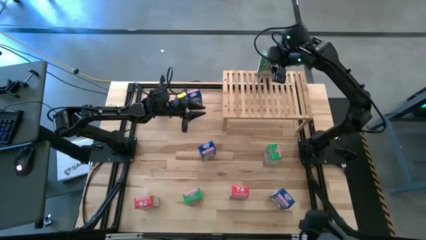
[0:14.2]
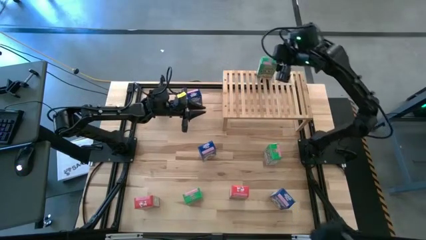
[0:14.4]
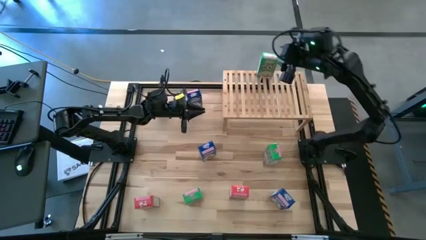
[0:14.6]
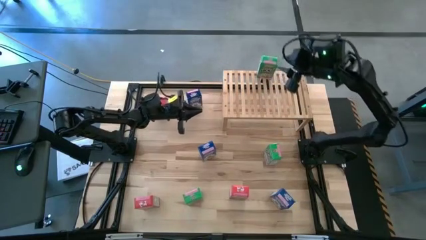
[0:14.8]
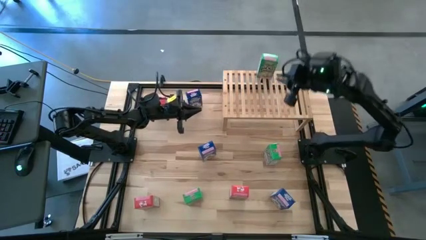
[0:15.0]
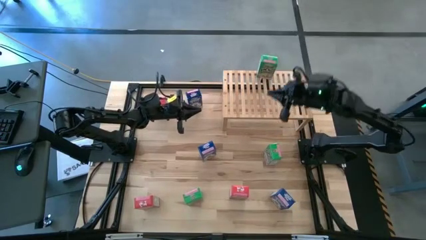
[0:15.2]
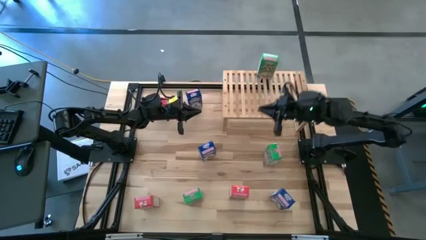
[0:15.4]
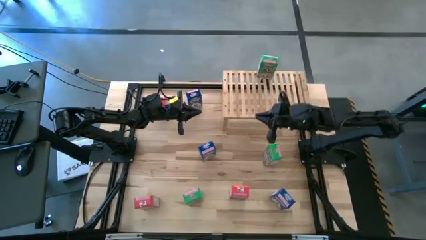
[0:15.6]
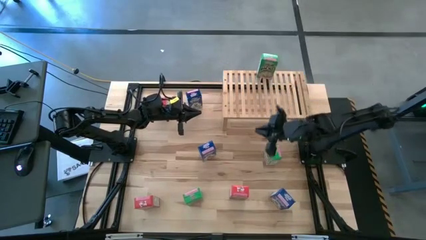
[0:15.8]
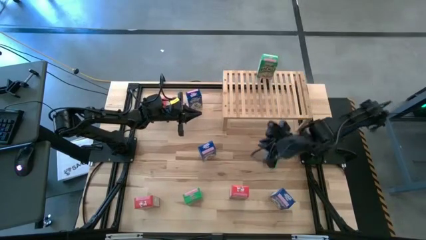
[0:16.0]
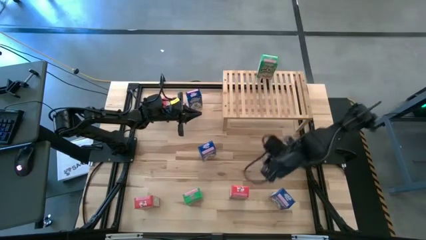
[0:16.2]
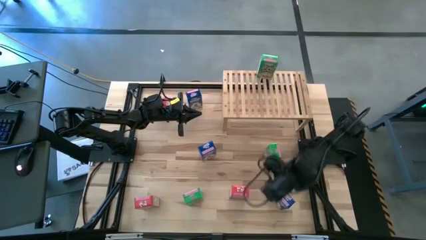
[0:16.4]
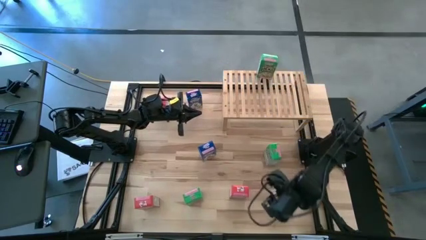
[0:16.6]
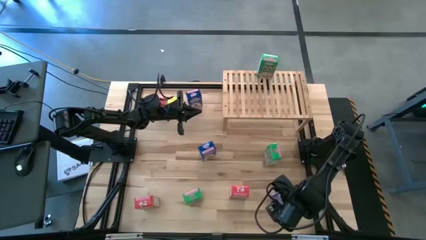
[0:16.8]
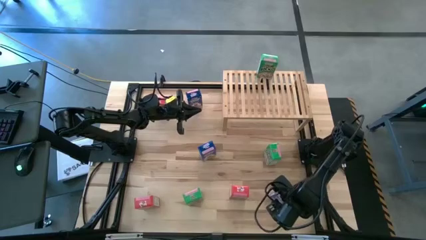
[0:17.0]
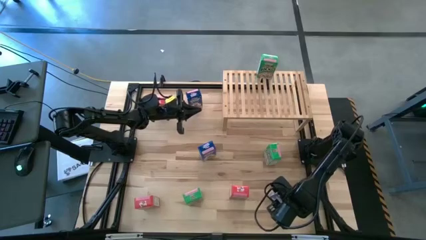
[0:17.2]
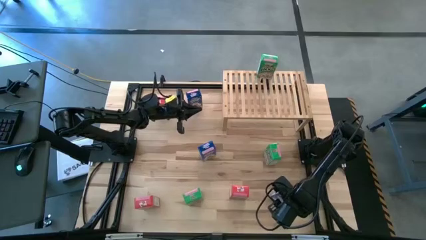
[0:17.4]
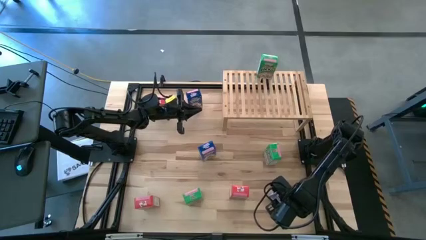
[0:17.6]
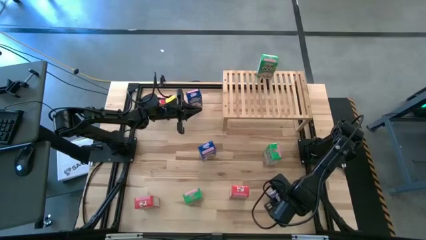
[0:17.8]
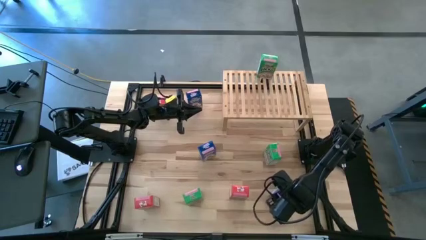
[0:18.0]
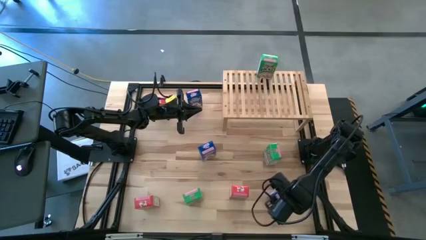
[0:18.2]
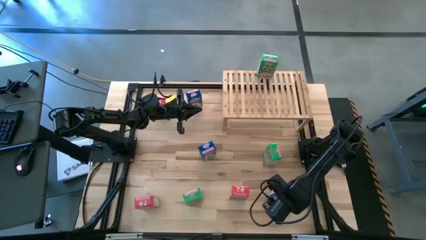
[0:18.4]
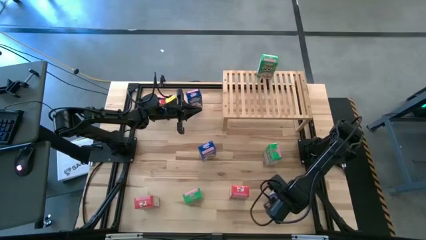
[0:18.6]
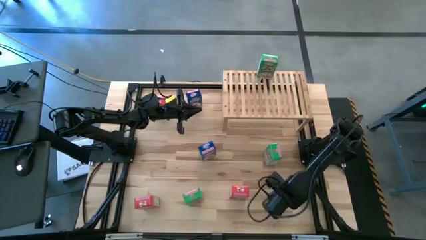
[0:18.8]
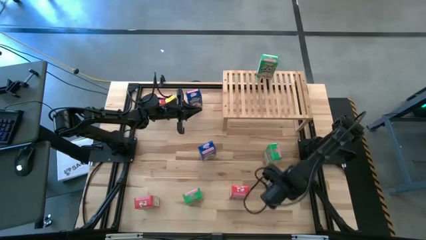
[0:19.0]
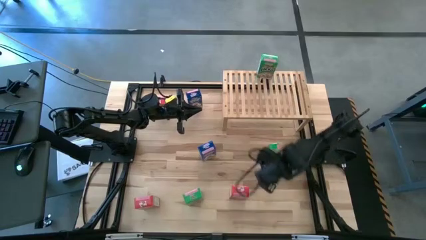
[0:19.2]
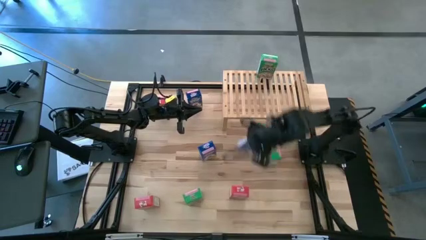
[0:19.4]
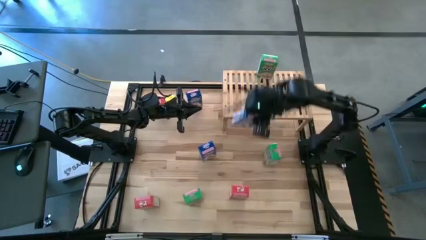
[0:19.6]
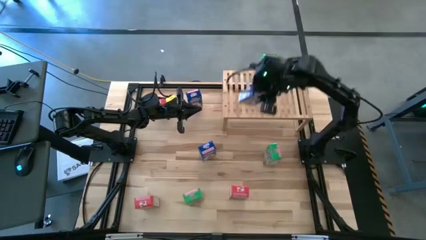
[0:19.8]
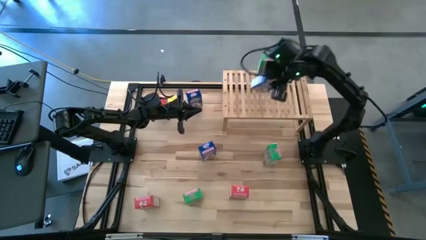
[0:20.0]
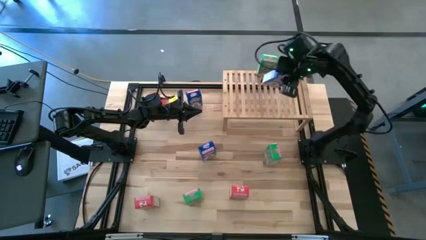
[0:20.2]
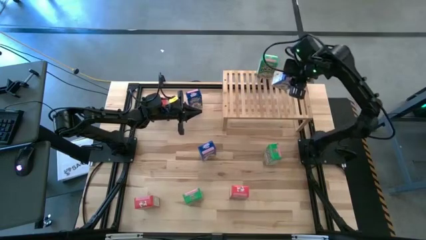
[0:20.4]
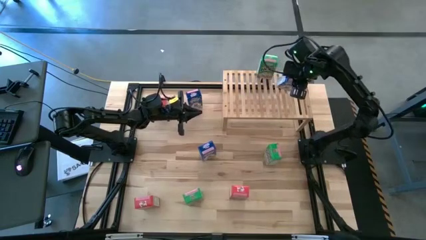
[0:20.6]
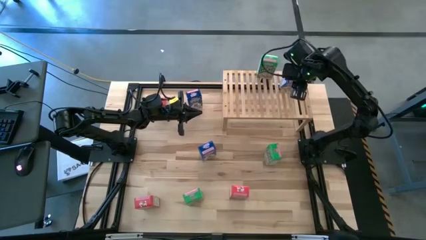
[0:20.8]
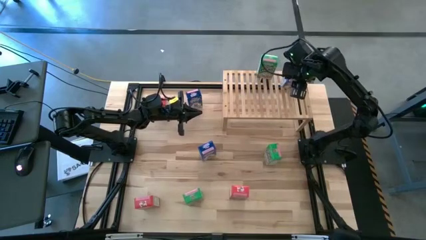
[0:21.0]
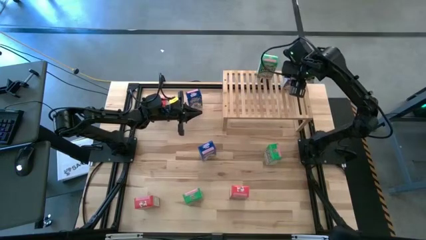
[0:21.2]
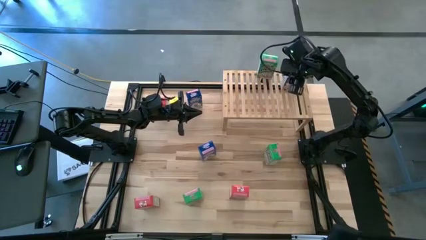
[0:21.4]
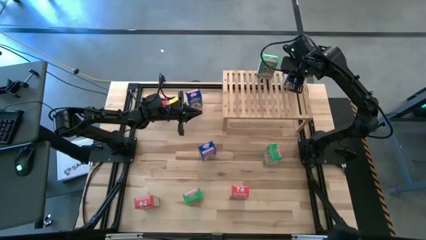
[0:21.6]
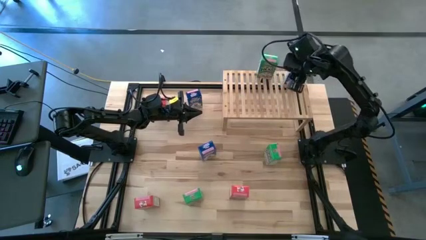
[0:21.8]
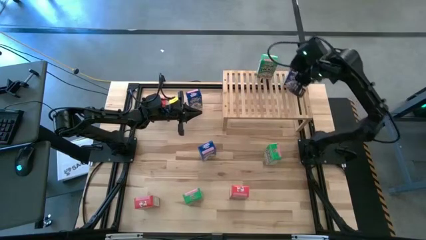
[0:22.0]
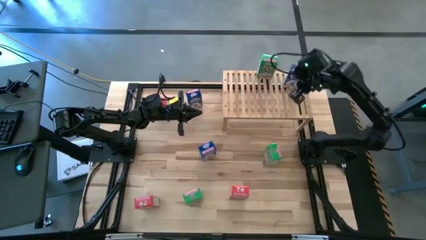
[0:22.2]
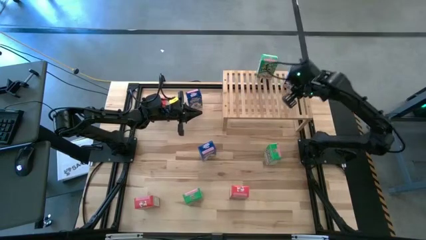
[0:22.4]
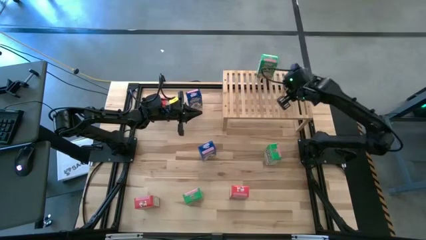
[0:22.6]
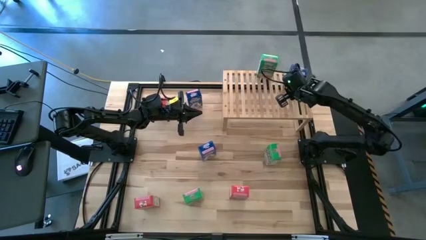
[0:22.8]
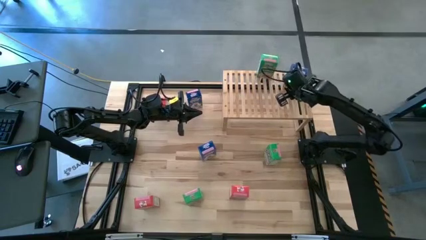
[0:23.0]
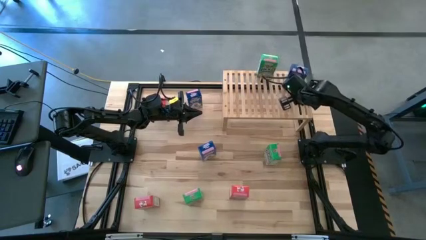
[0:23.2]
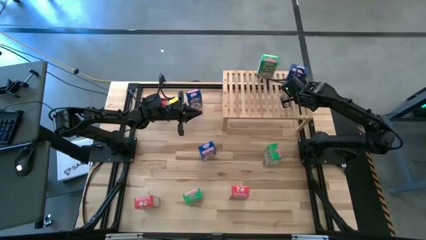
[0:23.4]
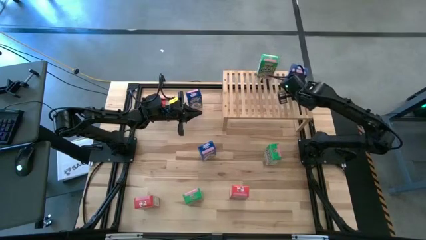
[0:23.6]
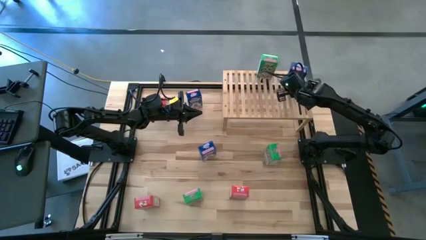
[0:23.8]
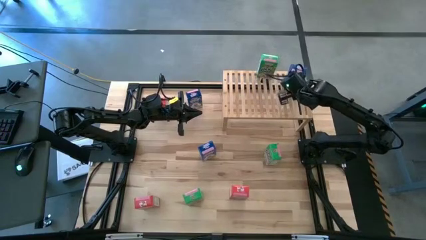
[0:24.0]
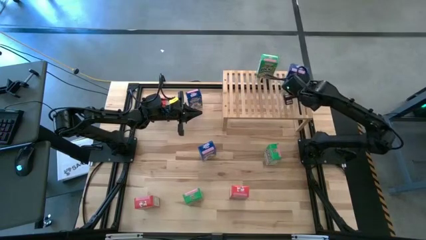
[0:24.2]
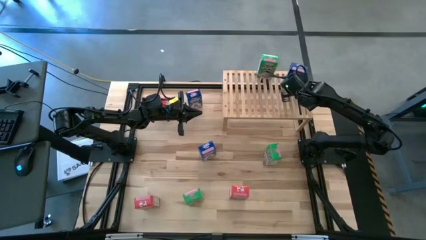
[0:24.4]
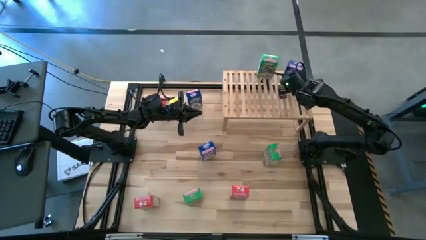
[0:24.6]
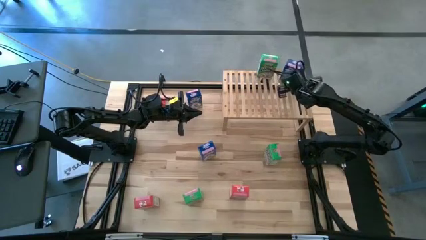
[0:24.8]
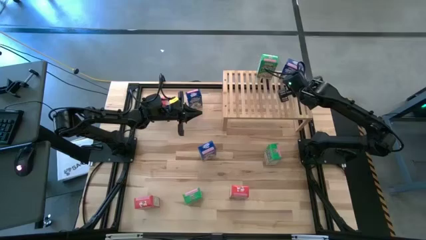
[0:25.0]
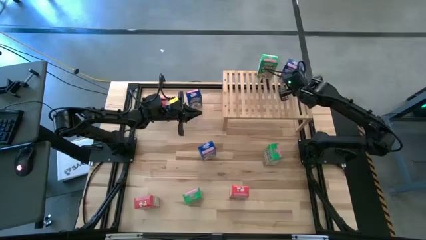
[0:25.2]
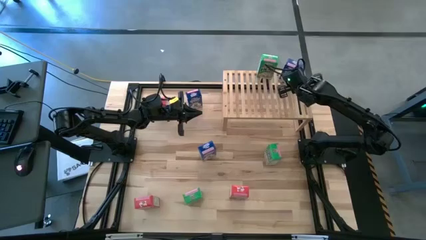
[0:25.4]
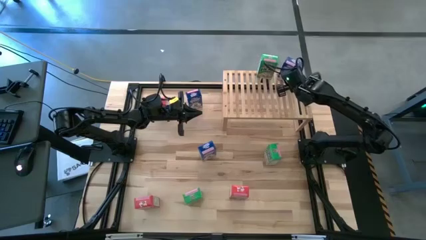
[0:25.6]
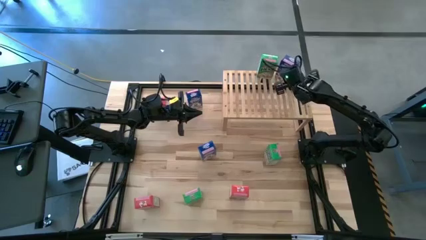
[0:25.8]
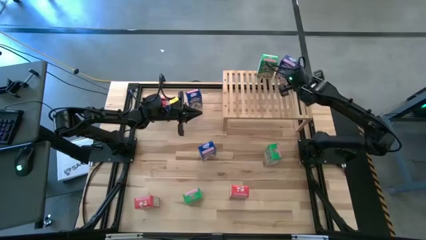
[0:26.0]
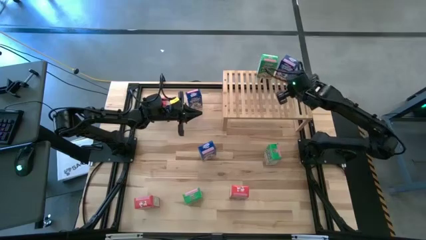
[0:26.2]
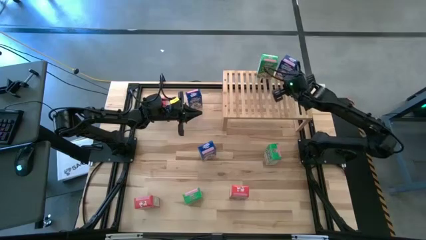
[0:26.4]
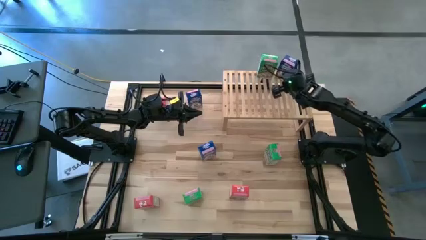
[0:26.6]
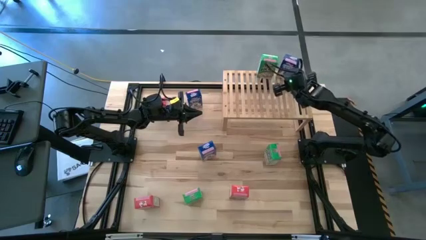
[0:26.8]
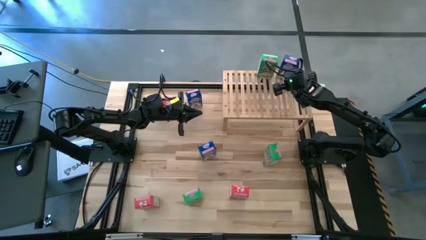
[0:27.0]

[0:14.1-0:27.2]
Task: Stack cereal on shelf
Put the bottom right blue cereal box on the shelf

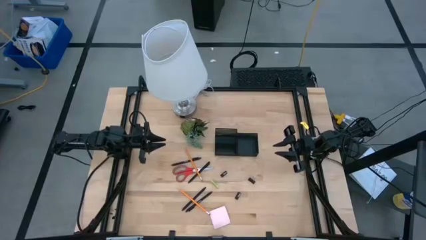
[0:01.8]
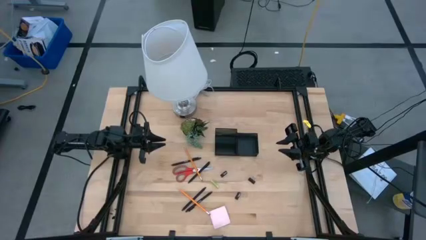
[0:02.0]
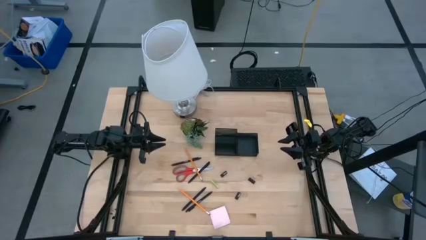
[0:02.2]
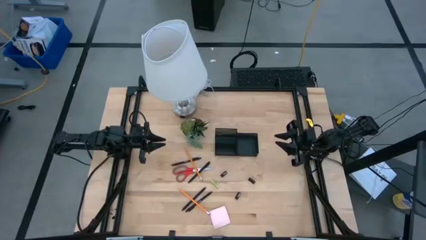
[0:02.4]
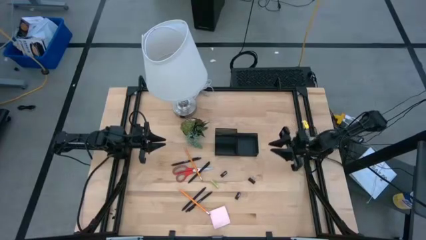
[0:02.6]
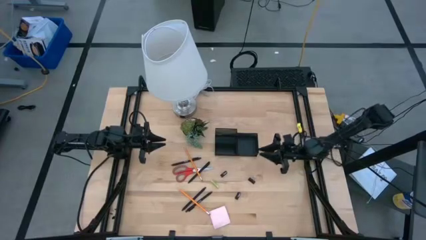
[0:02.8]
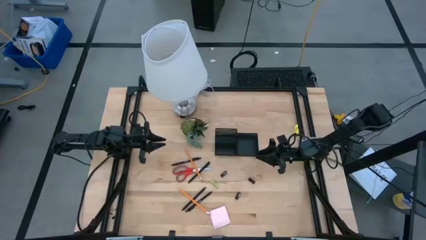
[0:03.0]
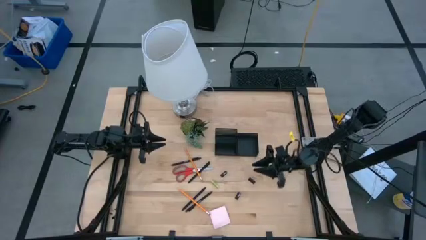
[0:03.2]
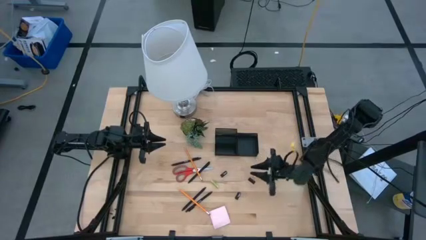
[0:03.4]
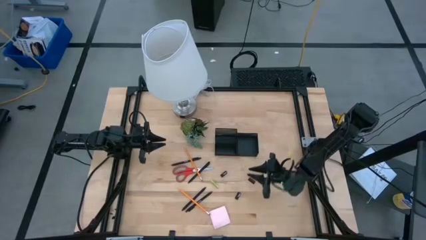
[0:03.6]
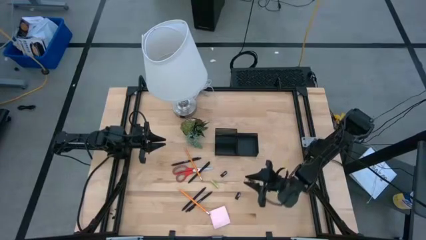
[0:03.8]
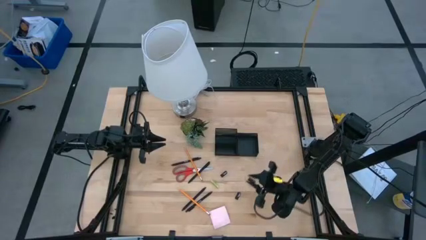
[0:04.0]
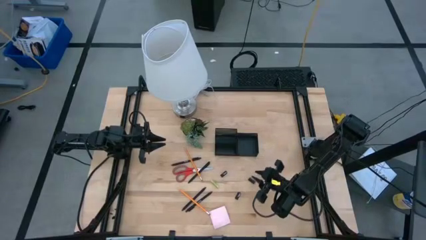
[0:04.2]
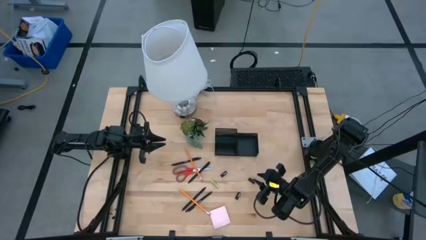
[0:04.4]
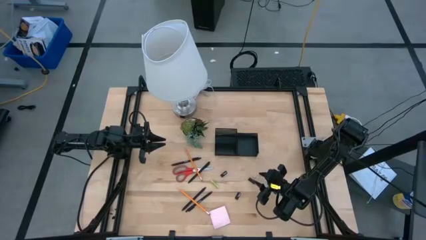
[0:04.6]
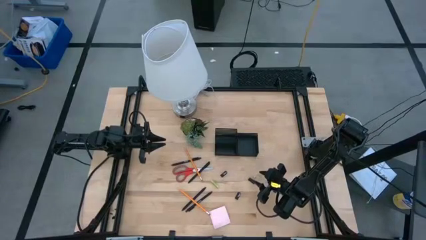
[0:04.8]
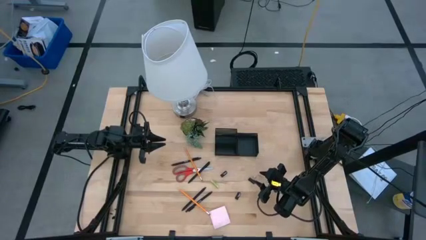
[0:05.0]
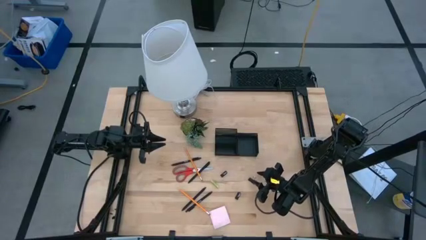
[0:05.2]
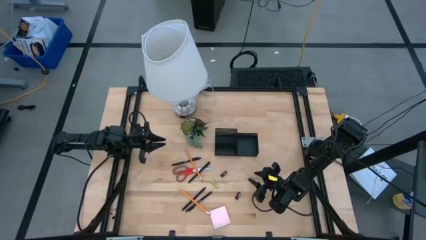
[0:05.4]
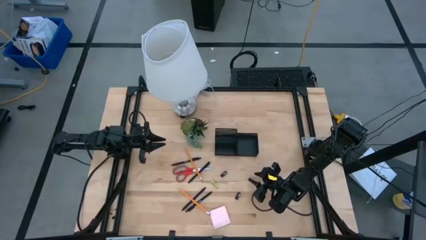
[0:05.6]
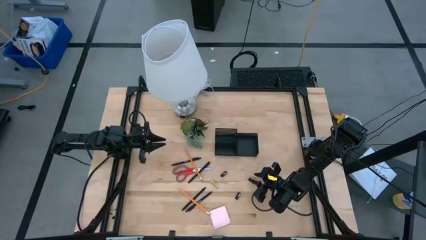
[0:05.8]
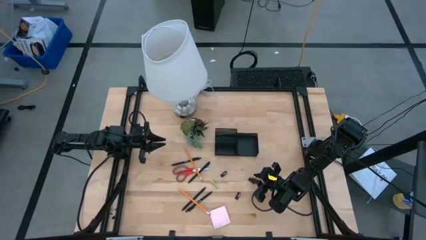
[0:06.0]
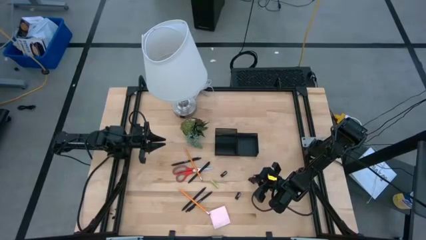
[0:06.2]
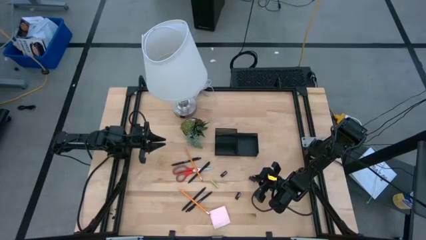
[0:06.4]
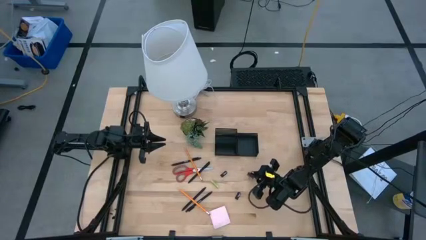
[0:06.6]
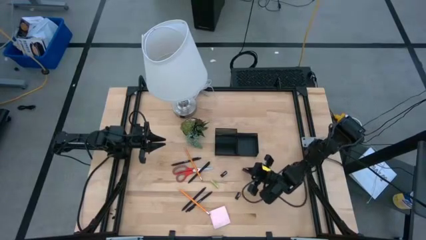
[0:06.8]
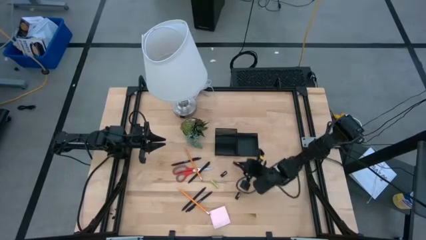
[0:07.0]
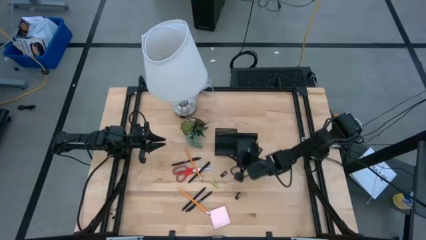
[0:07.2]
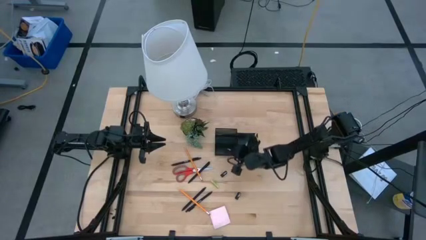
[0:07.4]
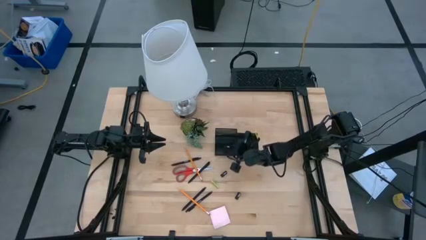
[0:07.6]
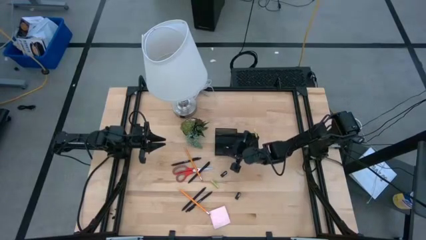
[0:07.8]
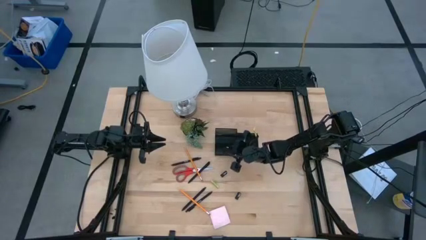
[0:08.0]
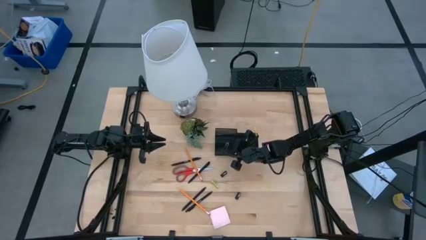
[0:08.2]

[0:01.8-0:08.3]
Task: Pick and place office supplies into organizer
Put the black binder clip into the desk organizer
